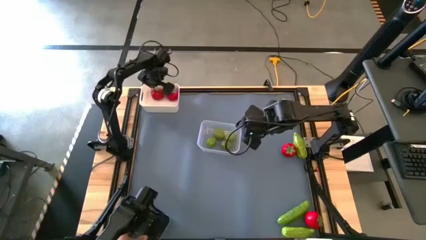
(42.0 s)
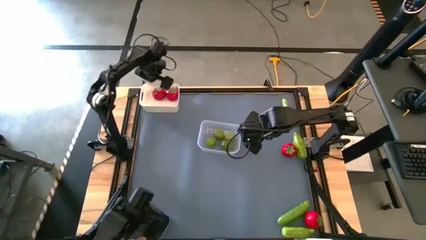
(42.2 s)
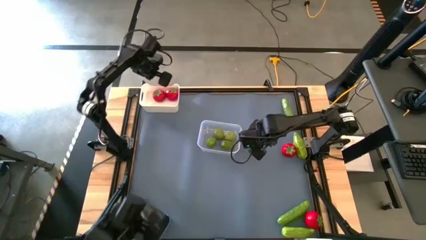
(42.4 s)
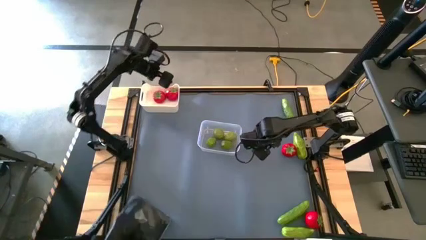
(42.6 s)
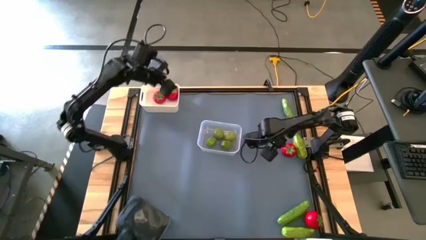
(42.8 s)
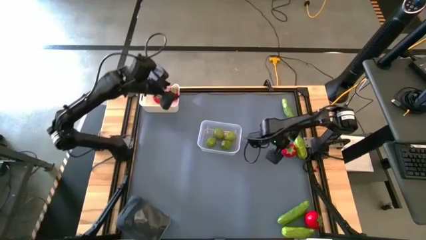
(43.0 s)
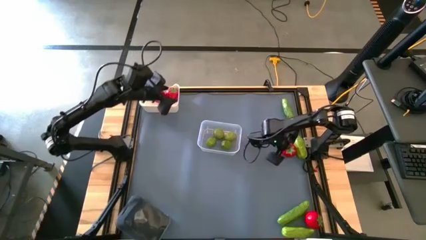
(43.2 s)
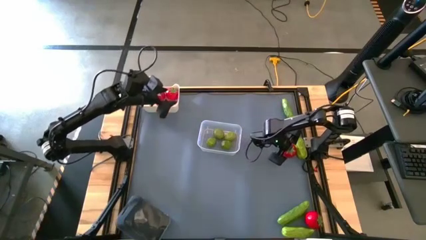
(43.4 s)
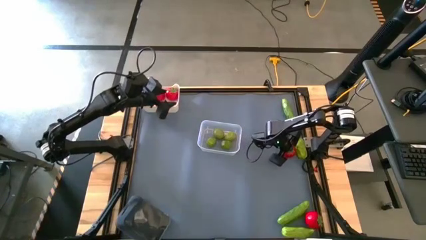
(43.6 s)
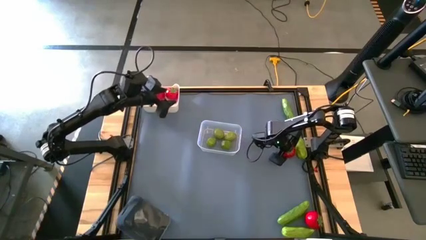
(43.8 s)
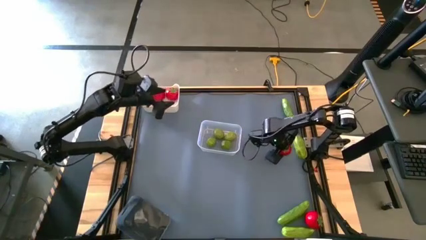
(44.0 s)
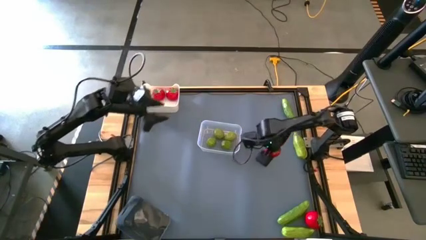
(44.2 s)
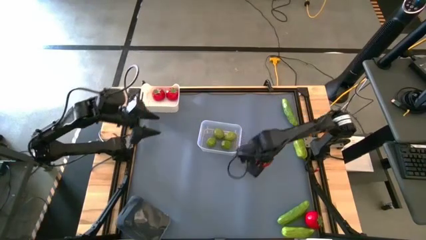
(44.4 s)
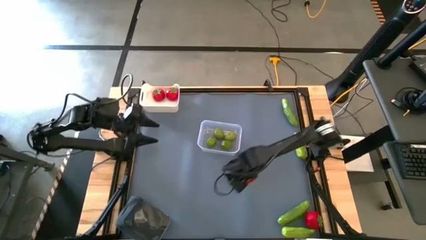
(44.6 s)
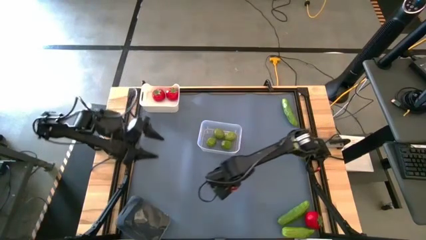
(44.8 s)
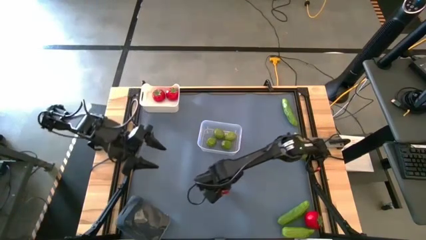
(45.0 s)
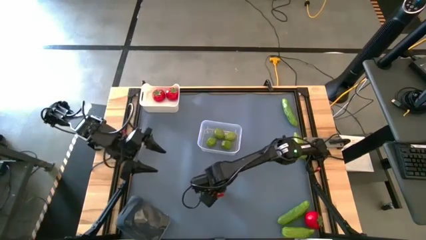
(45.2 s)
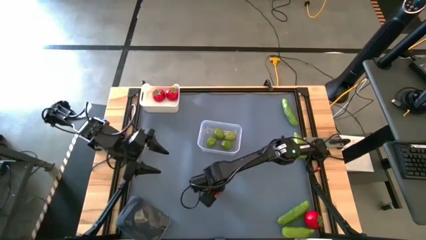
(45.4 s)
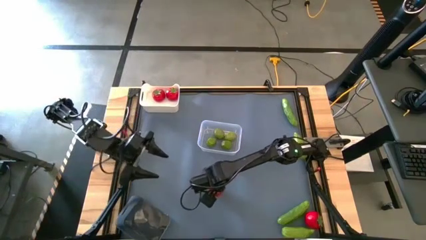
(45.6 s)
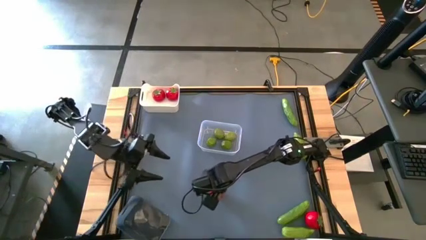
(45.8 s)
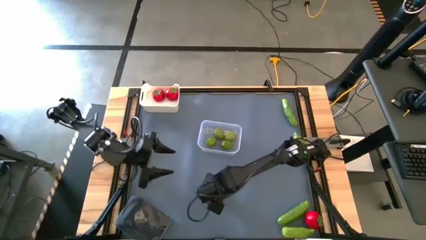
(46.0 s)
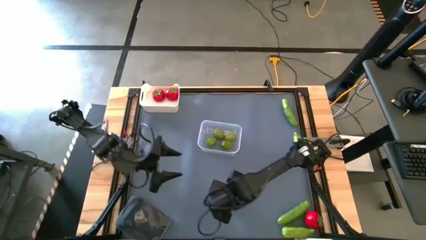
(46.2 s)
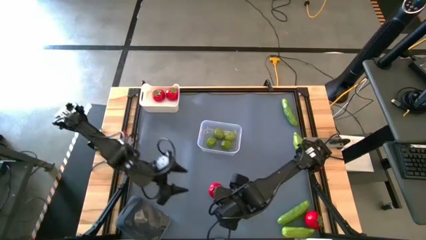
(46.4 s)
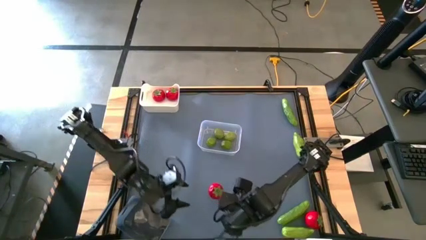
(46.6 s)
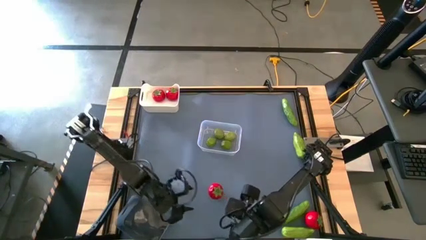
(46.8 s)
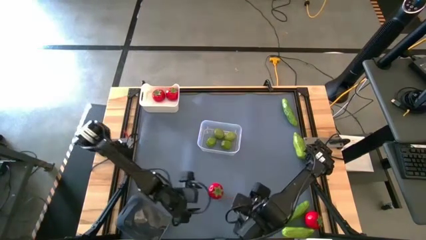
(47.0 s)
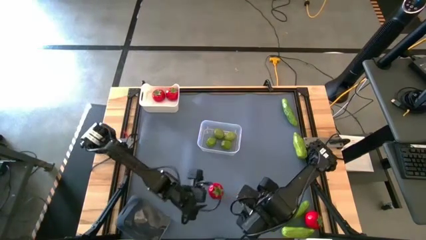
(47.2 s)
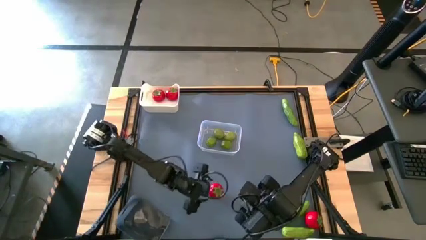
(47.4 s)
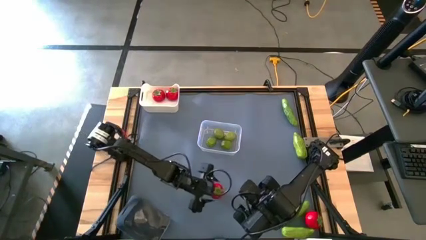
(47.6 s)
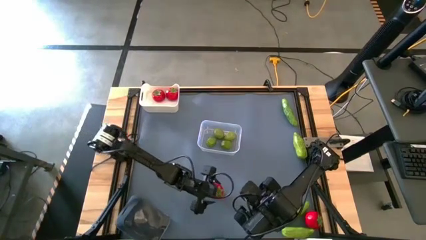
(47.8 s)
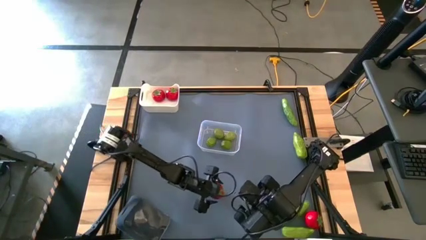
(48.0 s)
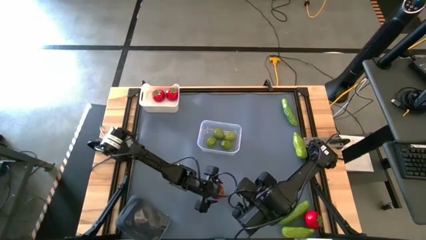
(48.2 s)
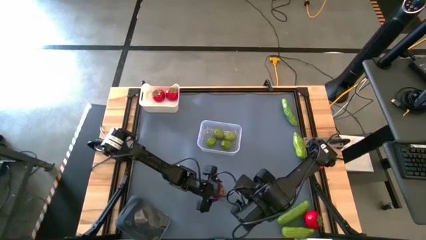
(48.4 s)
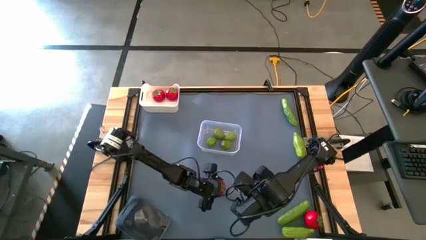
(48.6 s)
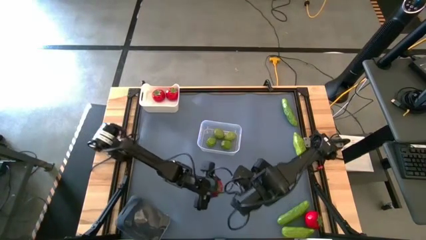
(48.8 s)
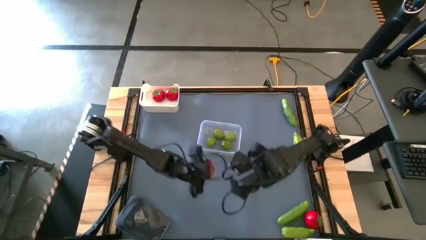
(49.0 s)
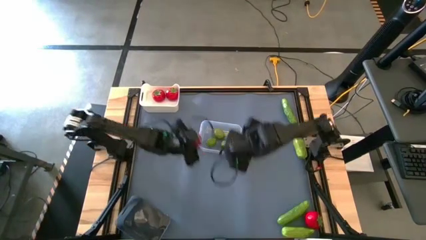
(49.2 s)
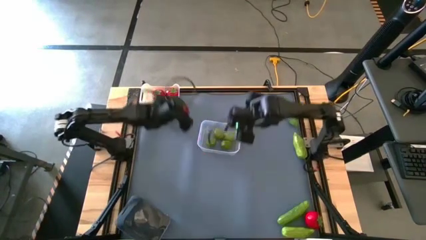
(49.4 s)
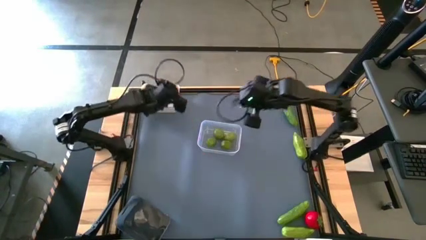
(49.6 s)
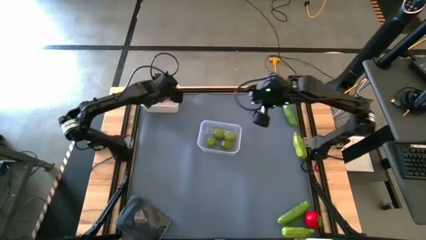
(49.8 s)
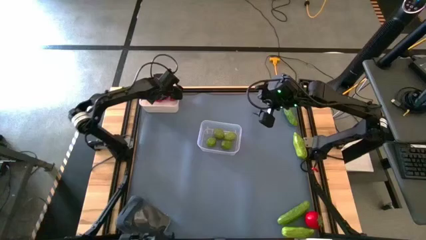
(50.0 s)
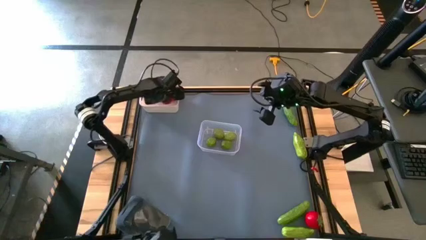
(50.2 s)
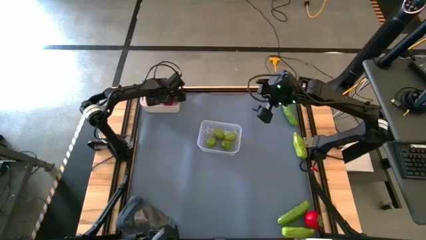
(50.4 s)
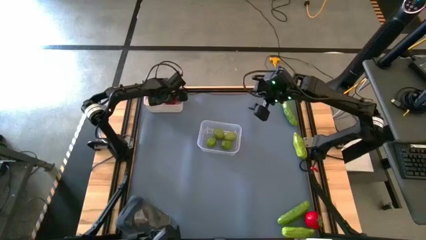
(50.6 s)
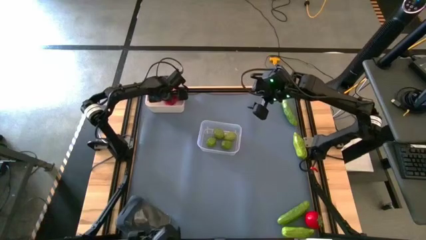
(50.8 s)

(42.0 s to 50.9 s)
Task: Sort produce into baskets
Put the top tomato into the white bin

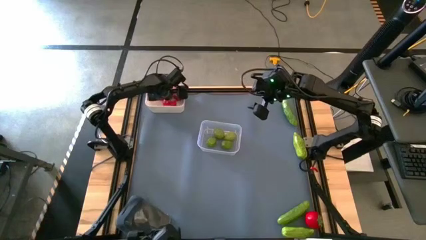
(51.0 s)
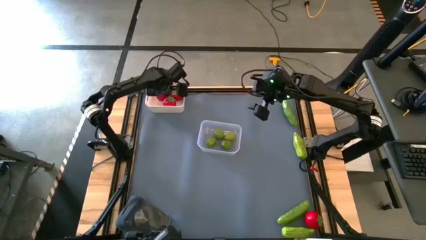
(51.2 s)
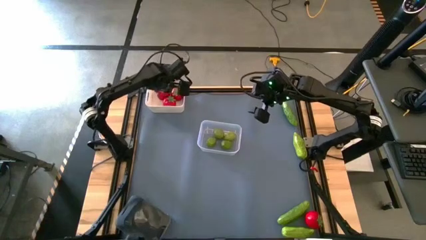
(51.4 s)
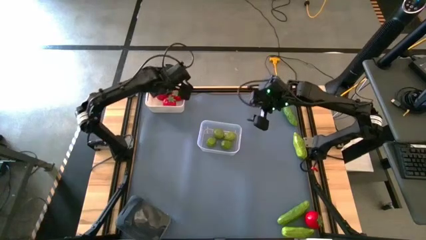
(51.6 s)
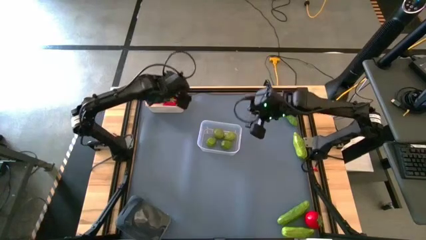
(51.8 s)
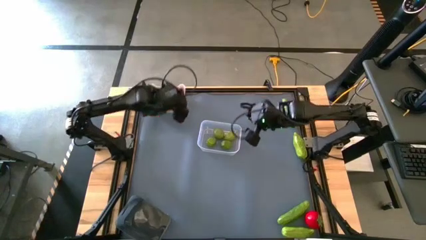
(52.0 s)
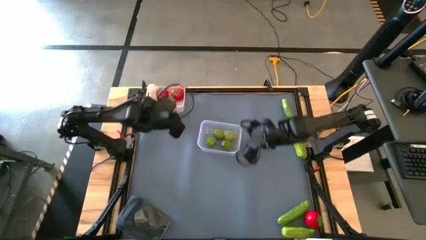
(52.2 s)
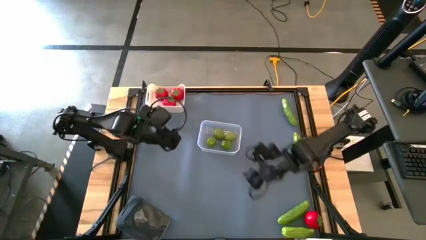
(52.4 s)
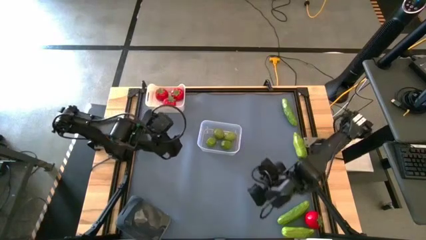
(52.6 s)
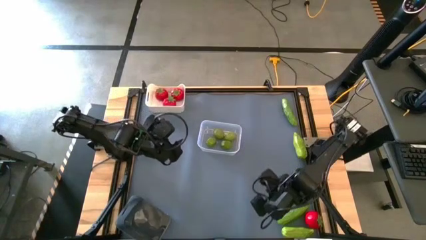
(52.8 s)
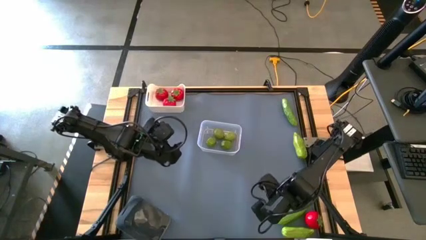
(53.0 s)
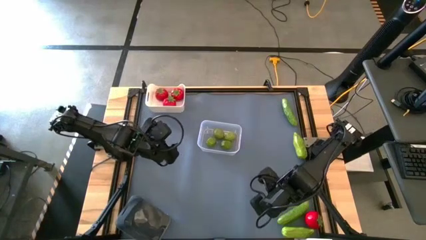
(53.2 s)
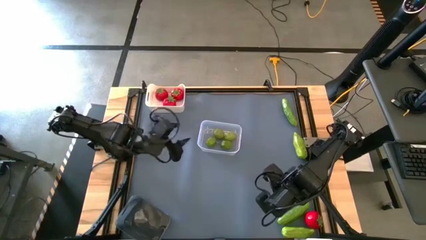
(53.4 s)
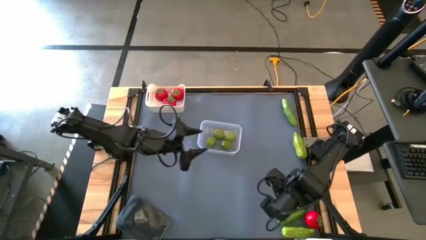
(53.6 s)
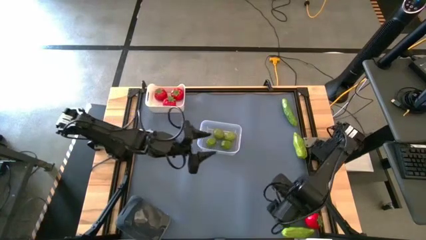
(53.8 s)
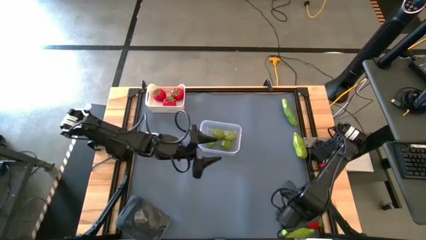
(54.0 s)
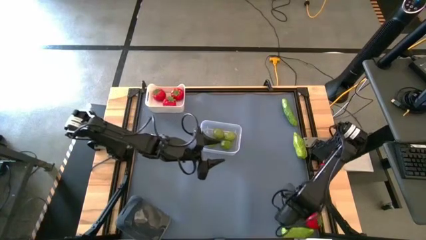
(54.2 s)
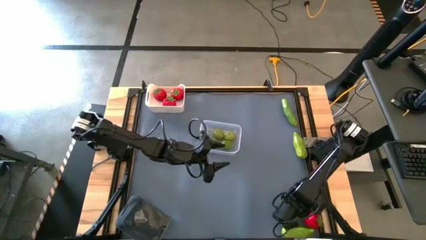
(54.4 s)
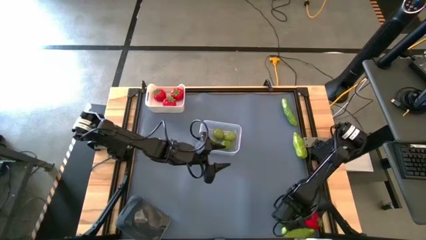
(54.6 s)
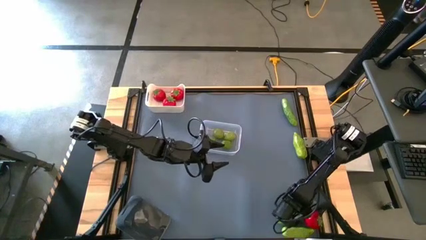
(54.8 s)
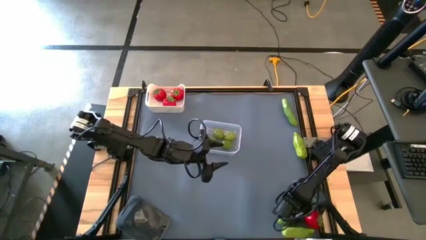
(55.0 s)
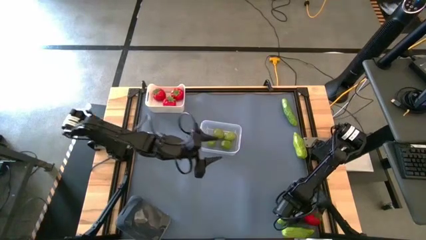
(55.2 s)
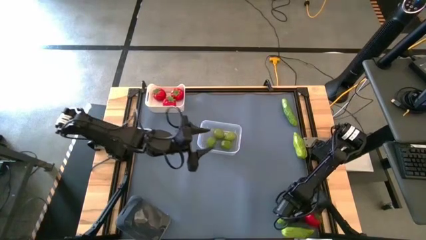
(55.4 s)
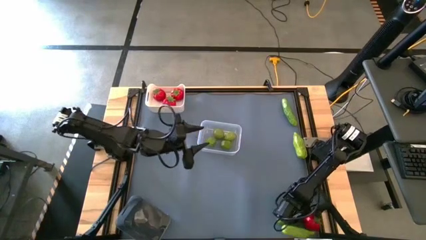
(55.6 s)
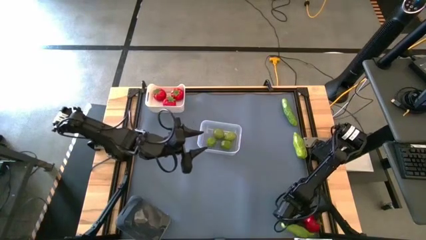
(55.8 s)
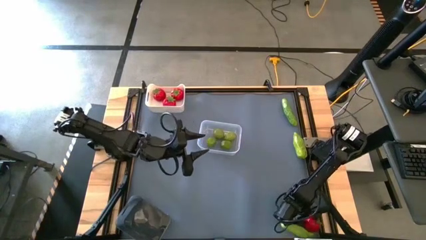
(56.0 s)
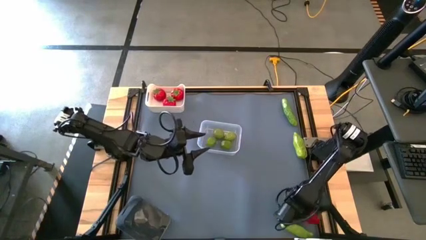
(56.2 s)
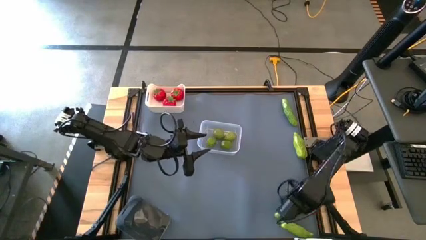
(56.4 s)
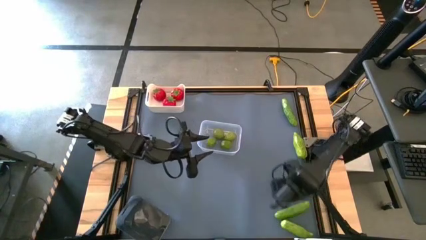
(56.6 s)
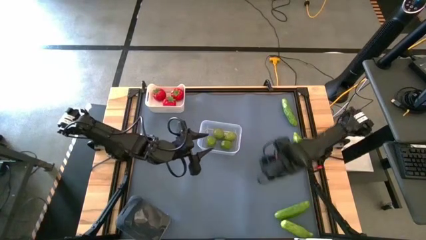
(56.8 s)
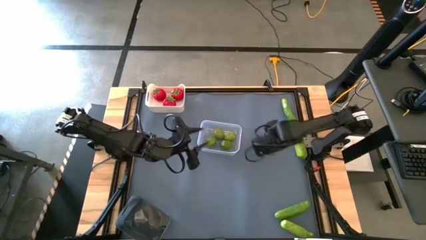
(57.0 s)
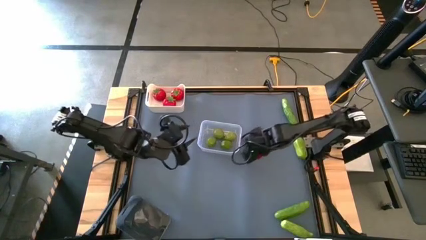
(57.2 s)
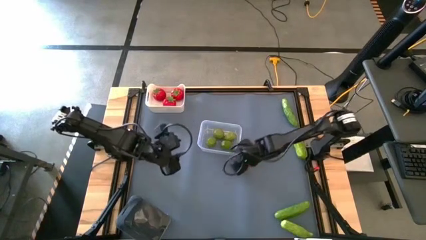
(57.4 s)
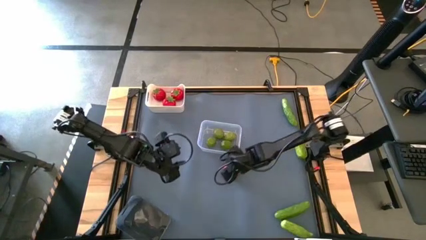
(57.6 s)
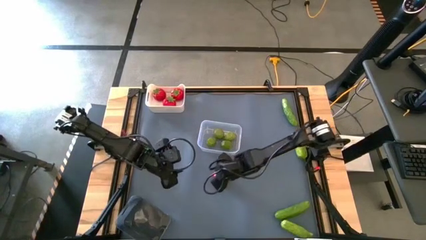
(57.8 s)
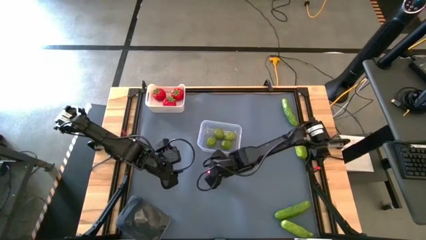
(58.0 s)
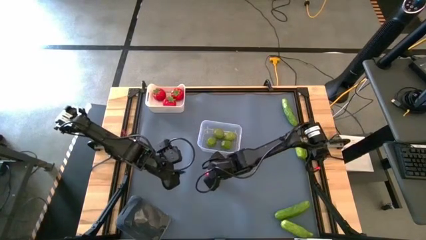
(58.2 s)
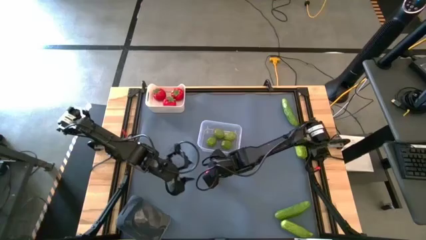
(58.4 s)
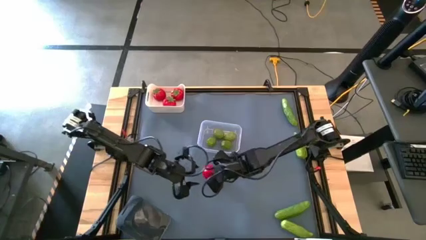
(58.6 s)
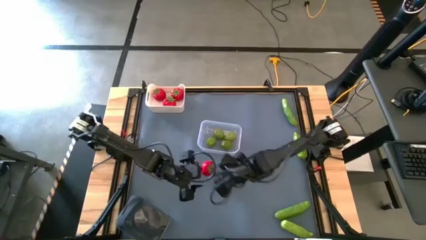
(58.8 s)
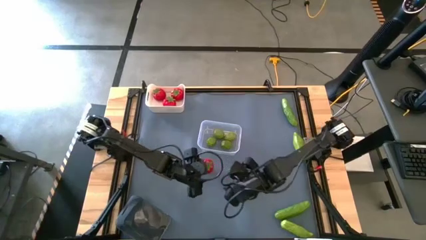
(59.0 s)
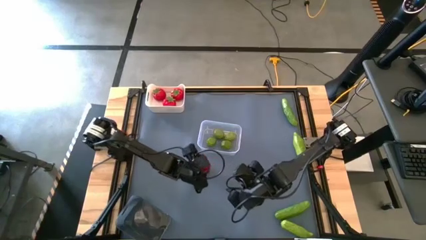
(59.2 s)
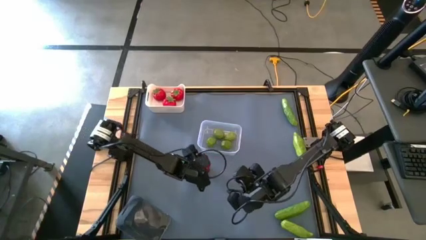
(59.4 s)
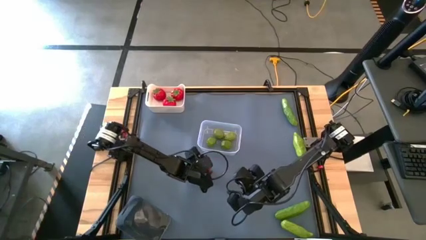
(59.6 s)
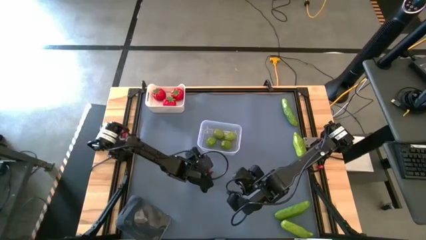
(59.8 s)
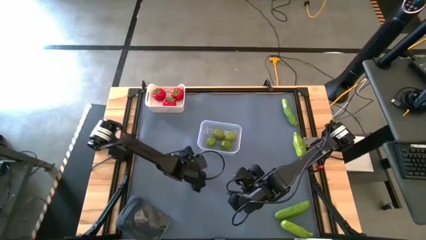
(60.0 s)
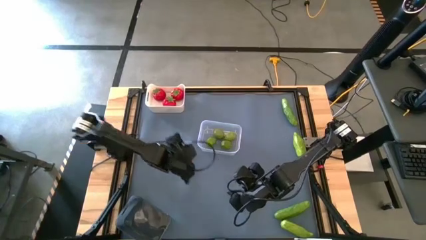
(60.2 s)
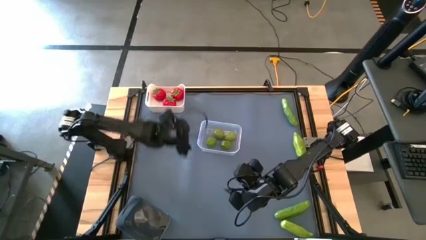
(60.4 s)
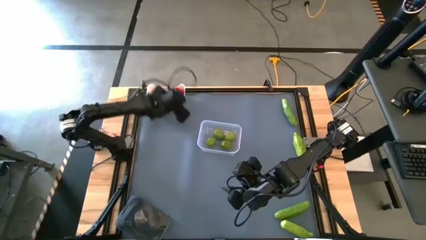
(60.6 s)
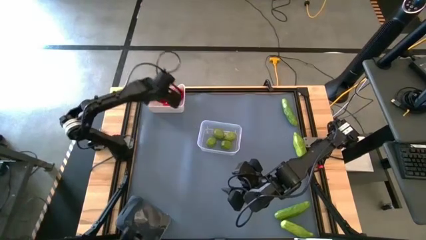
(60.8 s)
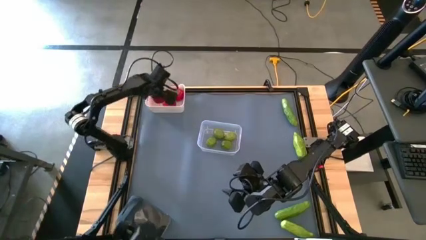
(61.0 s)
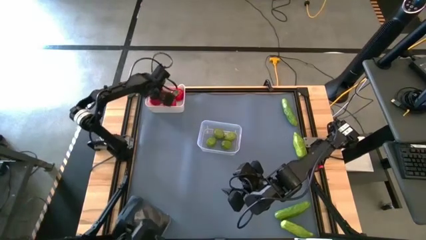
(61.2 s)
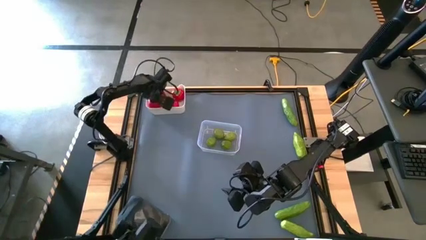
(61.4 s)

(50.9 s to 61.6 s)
Put the tomato into the white bin
